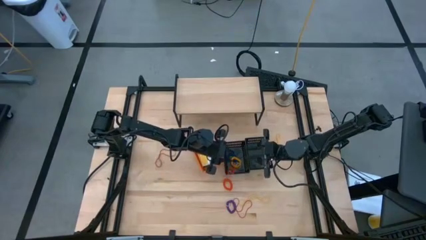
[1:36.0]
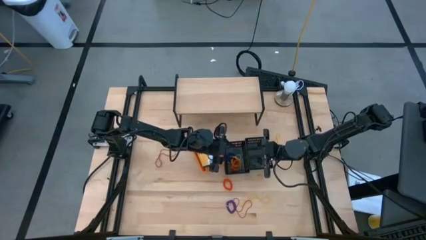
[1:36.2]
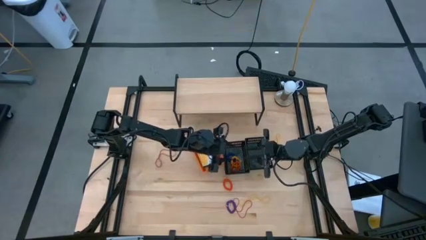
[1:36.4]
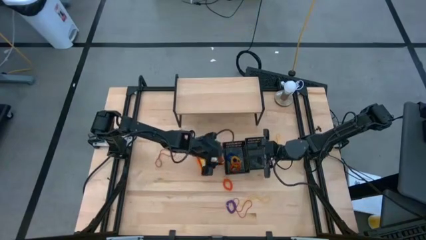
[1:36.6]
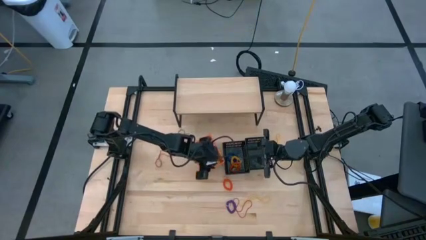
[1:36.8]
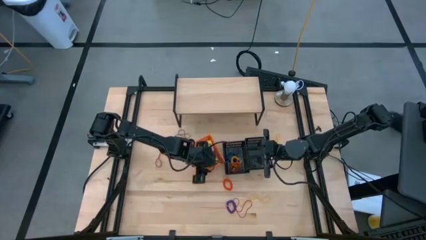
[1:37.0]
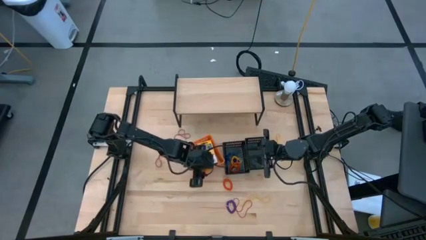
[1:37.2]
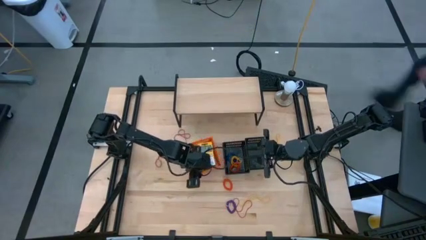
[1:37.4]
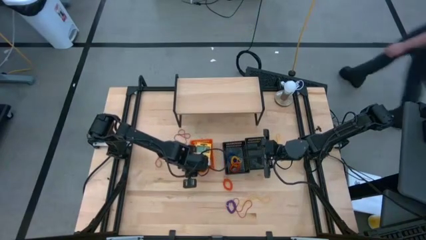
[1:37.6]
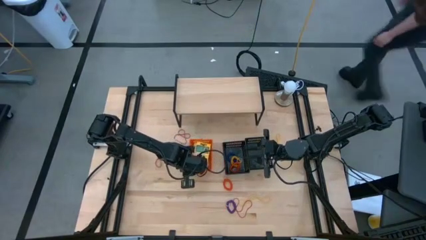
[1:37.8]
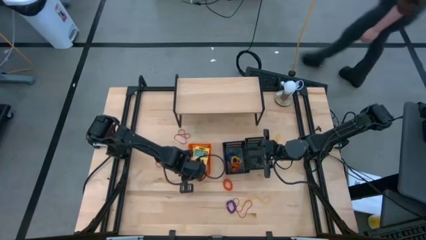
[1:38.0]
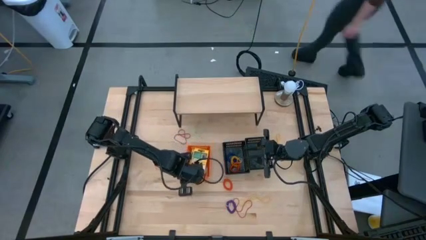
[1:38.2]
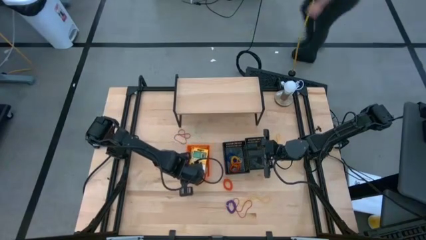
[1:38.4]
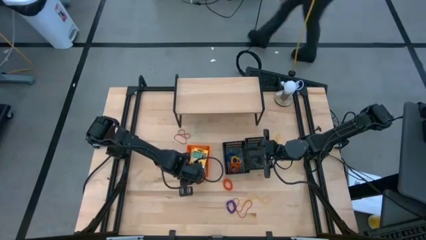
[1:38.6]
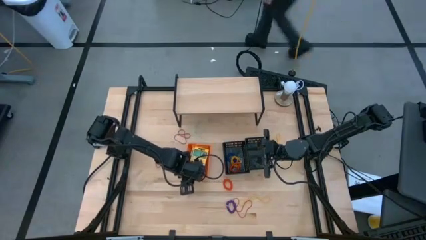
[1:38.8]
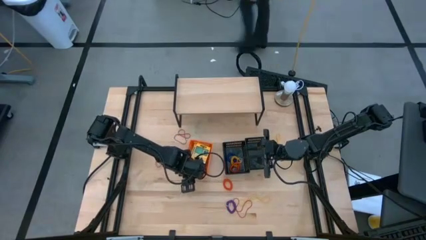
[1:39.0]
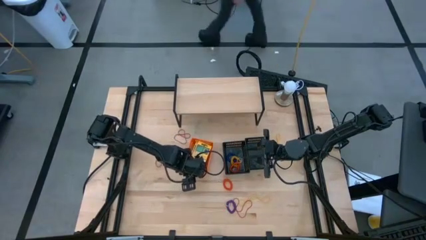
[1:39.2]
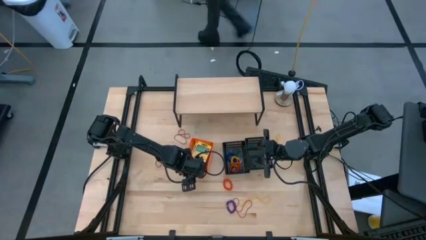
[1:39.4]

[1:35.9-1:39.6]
Task: Pick & Place Office Desk Supplies
Adjust the orange bin on the table

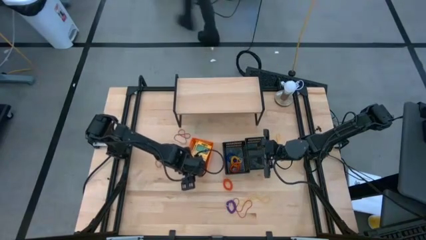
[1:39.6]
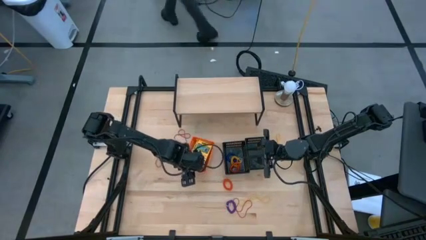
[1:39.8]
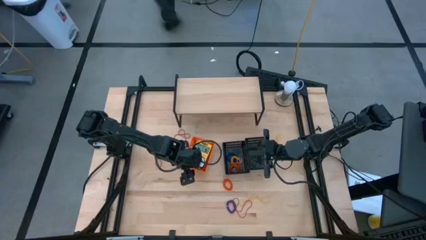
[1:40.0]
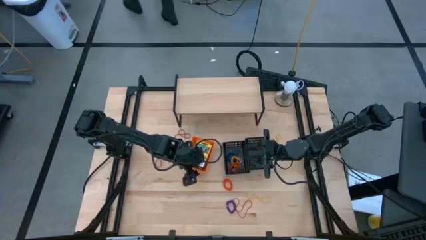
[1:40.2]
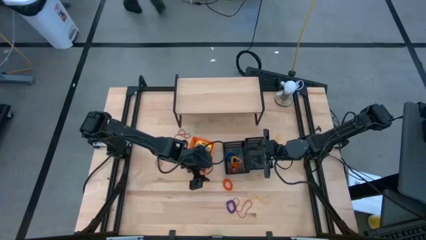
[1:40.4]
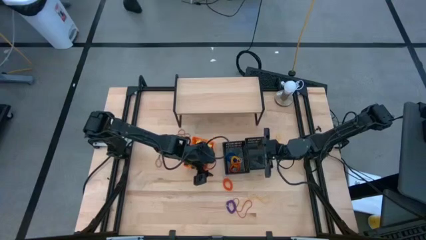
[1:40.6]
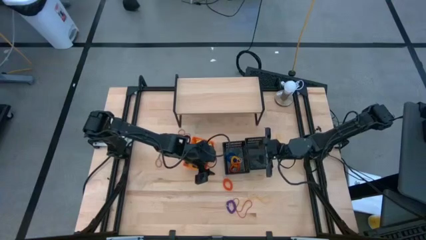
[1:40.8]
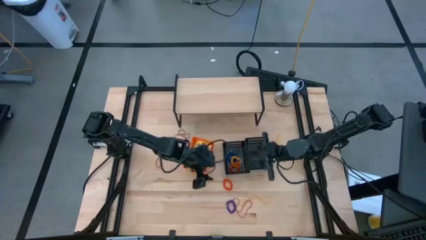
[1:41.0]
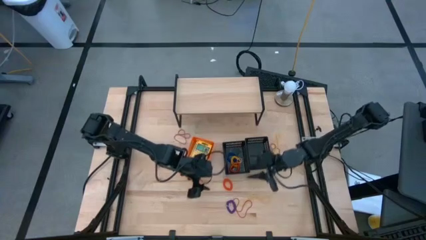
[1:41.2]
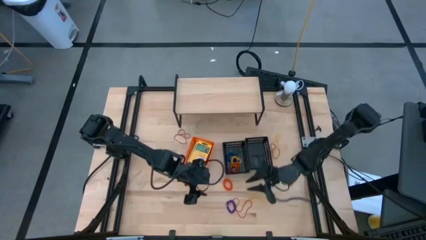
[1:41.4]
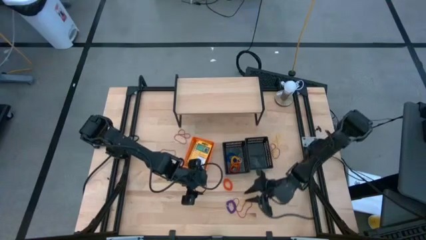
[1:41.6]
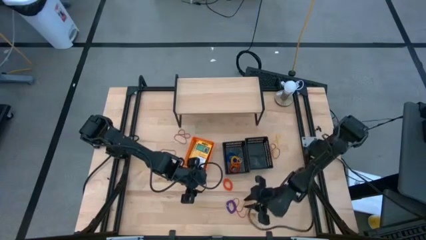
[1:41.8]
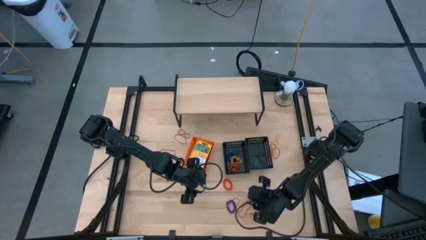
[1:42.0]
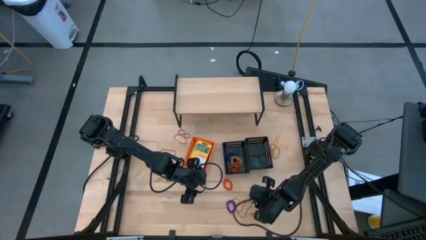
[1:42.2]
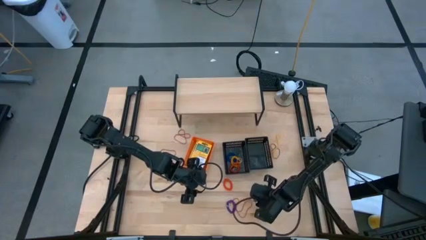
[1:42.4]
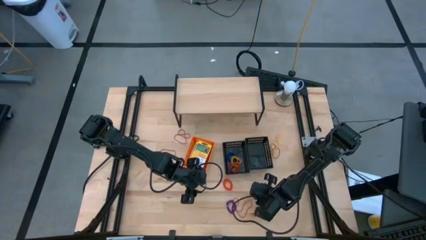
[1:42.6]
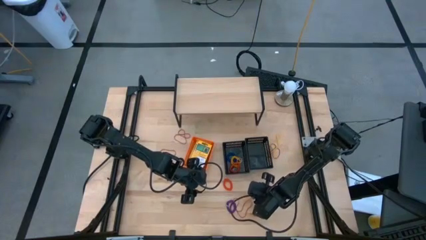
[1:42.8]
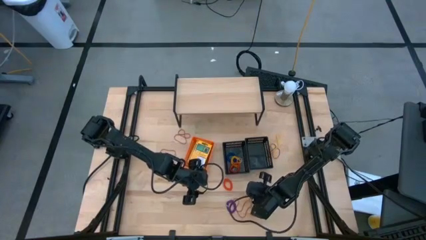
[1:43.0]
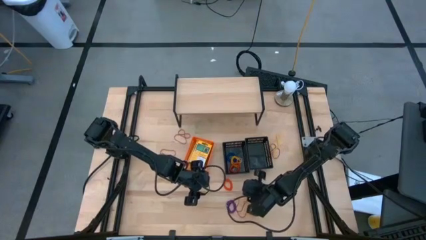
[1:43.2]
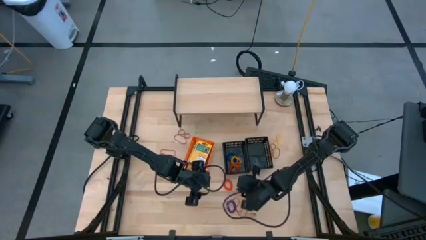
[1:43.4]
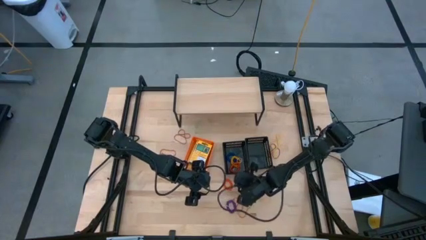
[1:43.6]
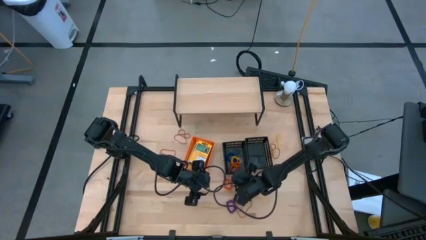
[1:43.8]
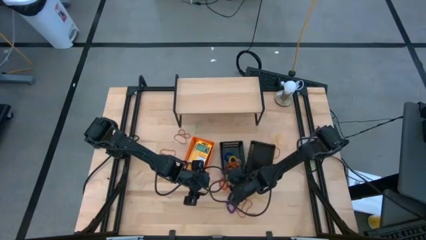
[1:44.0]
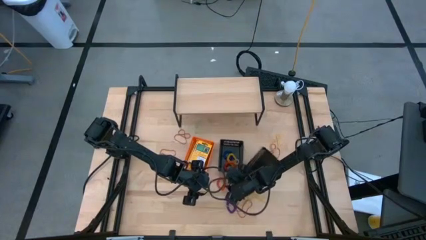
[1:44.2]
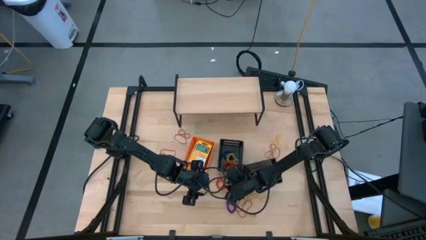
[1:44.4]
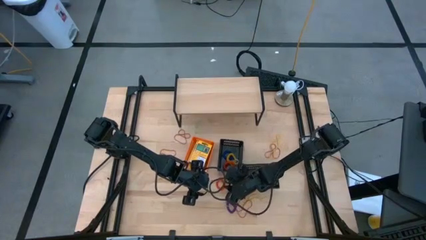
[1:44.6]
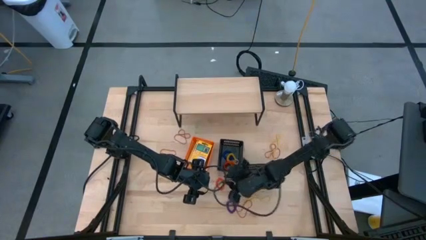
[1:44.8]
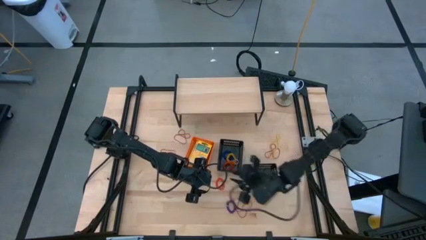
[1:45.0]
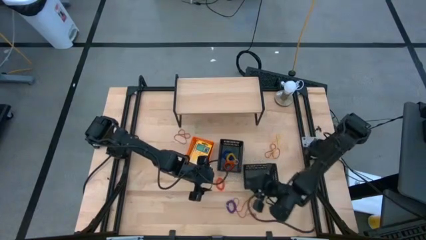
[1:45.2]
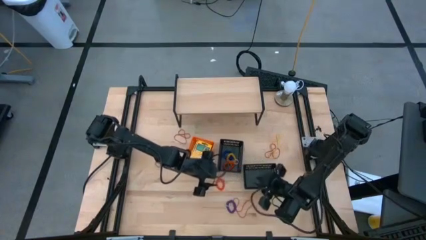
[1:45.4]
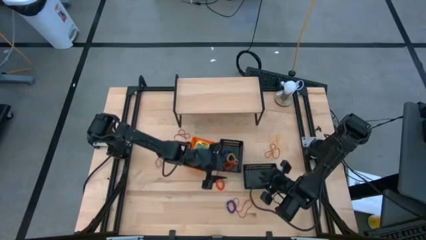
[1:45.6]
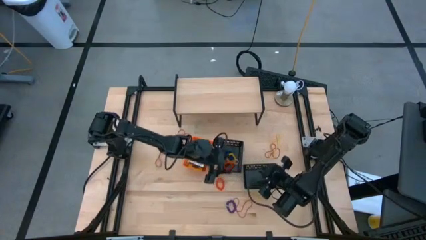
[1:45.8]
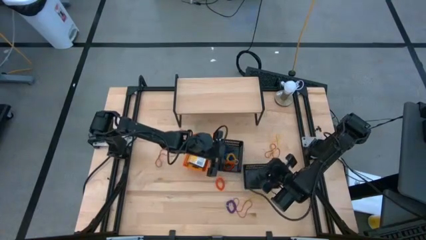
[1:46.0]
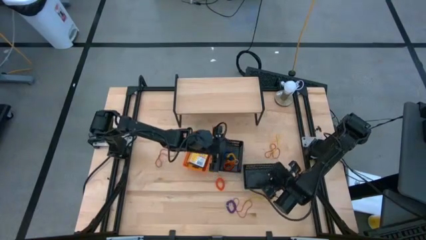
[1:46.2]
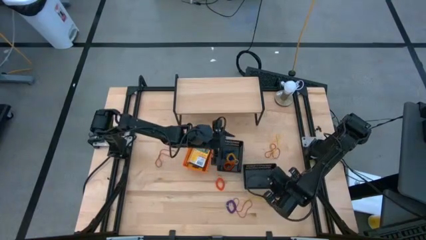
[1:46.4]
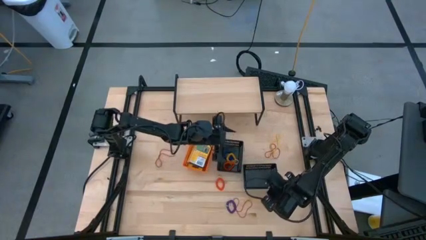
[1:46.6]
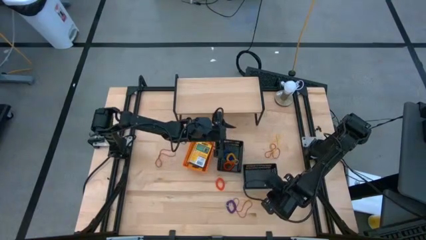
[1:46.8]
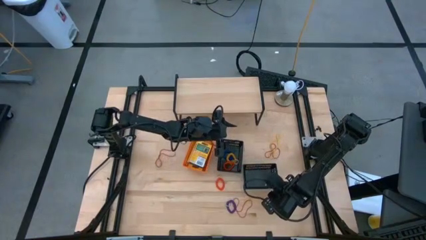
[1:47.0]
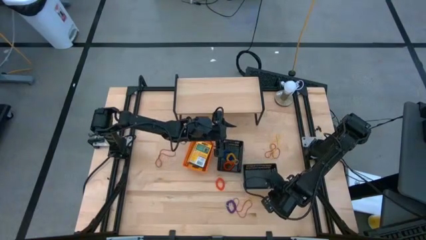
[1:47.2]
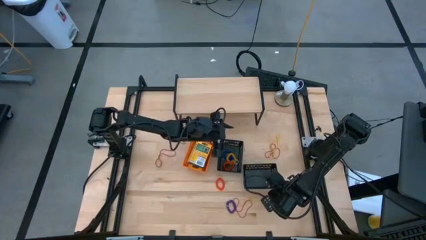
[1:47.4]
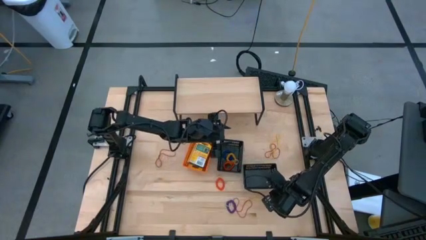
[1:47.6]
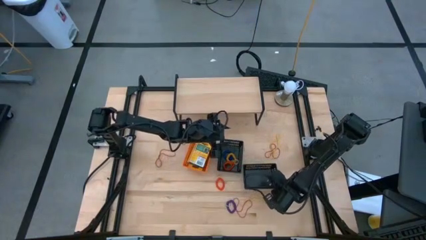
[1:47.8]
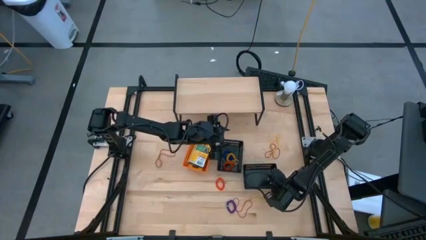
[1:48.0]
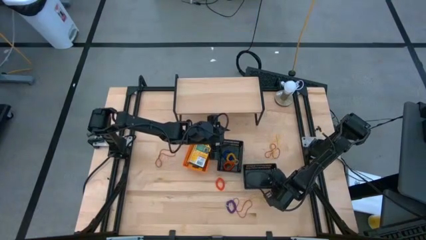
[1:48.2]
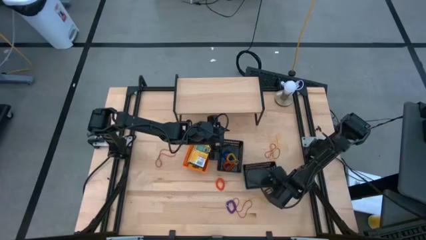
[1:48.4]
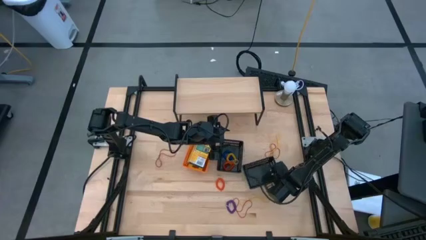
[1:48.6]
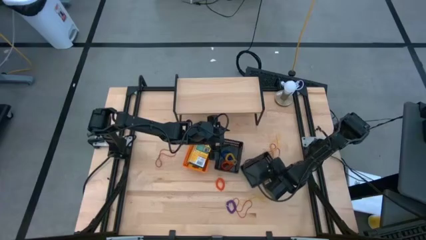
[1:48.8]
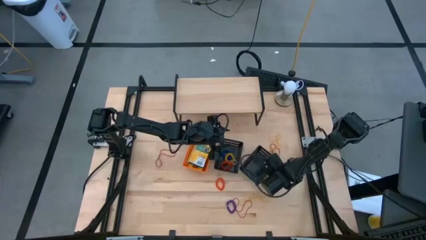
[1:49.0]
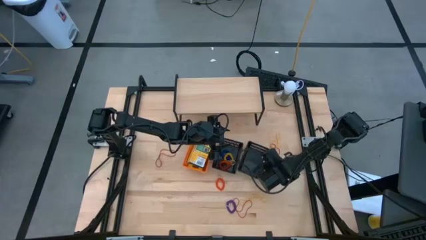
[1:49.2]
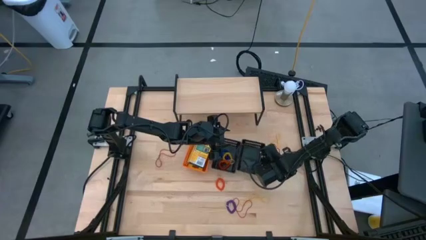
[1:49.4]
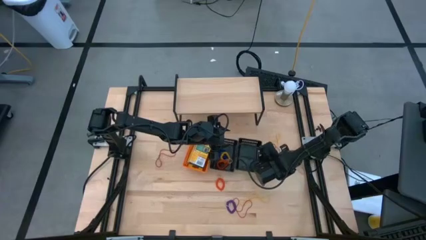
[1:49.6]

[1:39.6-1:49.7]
Adjust the black bins on the table

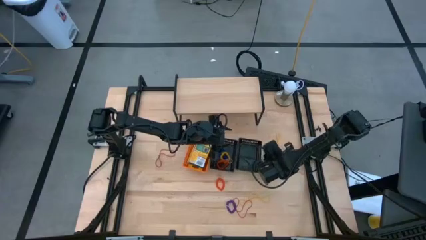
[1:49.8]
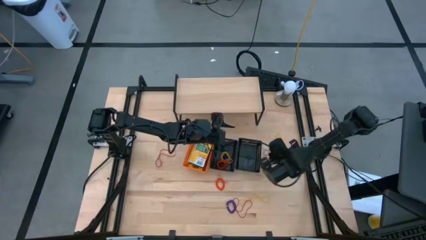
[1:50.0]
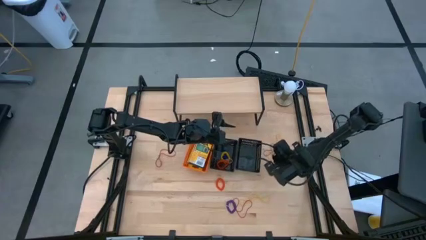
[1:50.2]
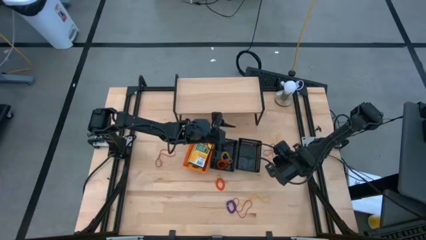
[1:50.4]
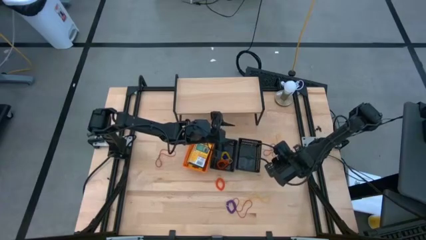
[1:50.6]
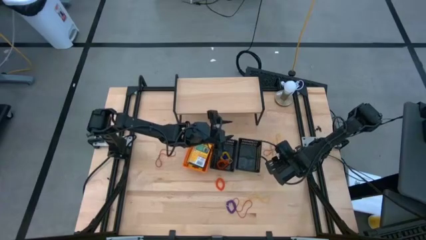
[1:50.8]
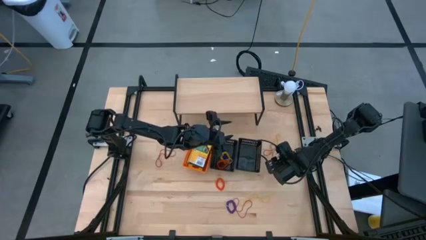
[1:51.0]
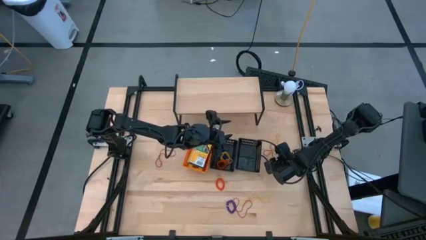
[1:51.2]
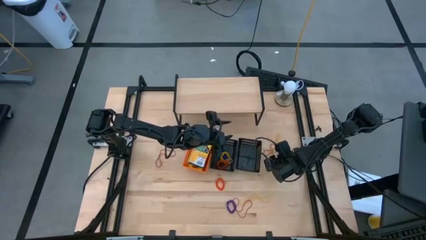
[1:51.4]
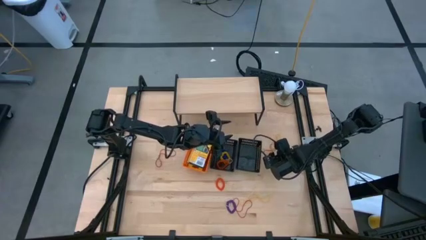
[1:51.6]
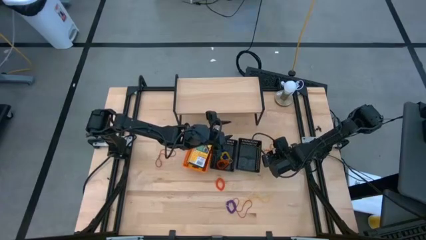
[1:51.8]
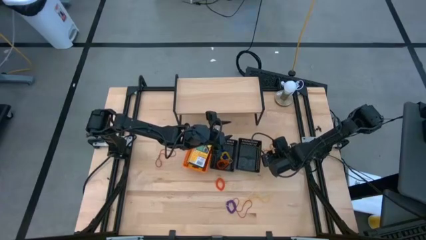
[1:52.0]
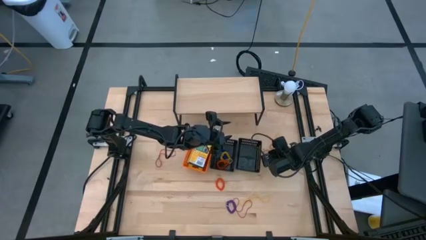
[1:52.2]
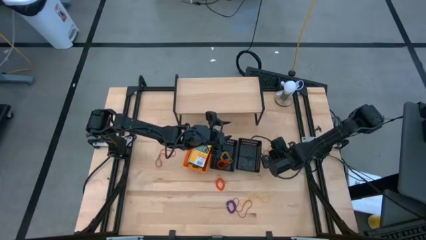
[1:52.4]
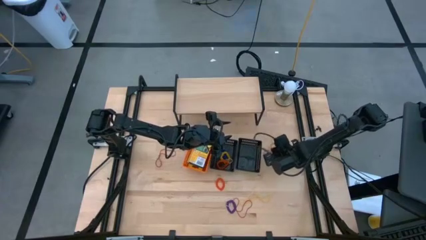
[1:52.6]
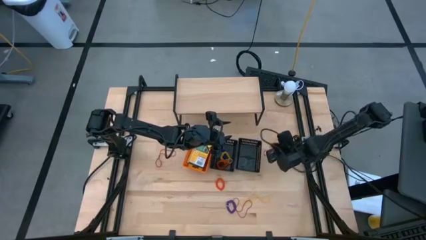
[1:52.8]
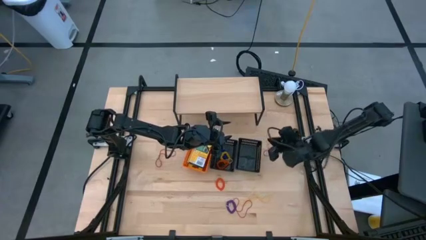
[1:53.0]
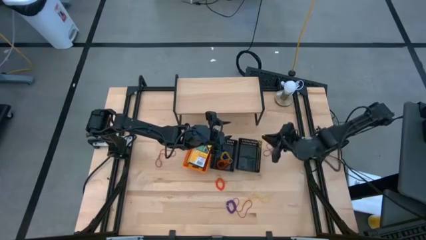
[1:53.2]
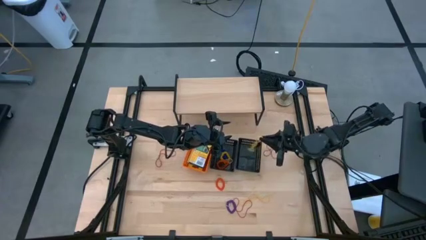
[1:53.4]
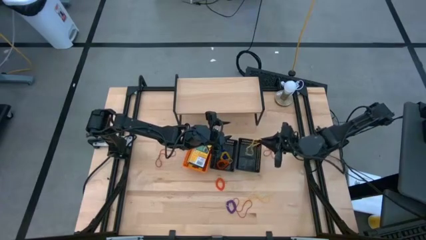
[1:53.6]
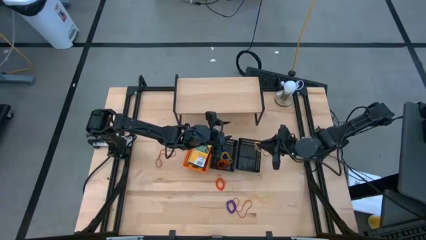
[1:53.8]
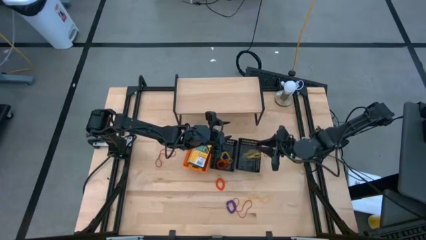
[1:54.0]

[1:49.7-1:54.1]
Put the yellow rubber band into the right black bin
